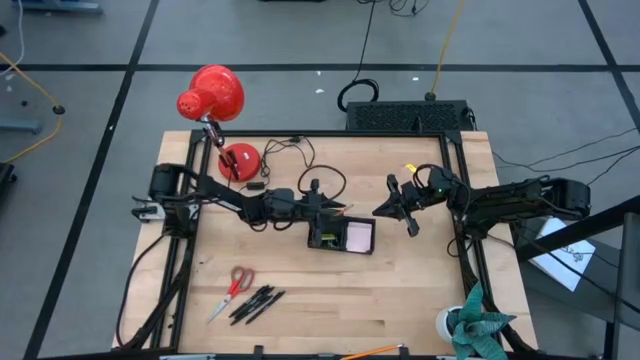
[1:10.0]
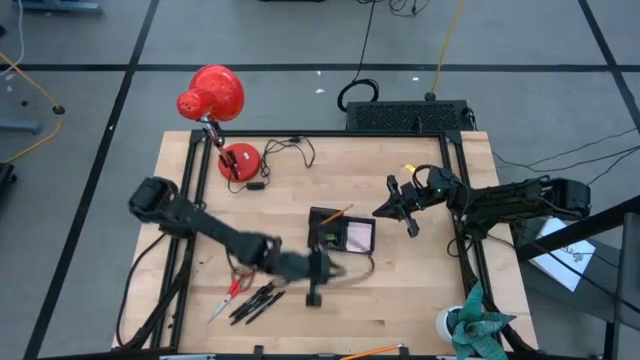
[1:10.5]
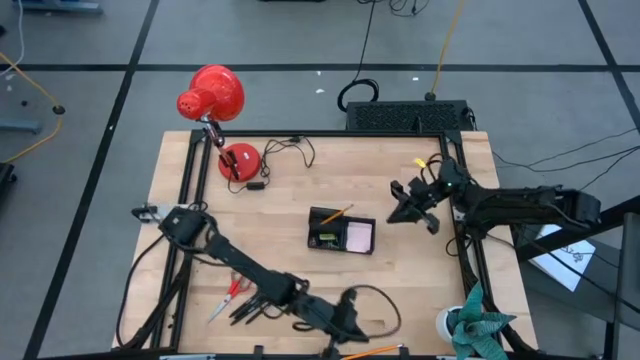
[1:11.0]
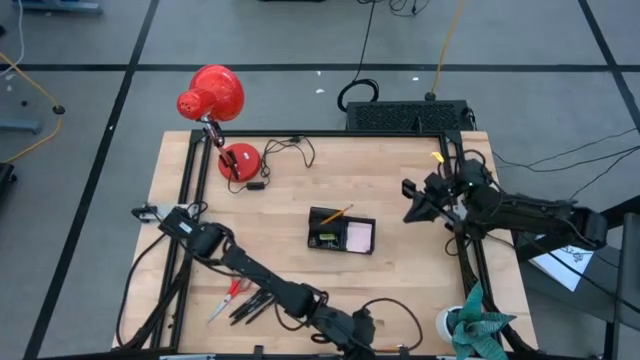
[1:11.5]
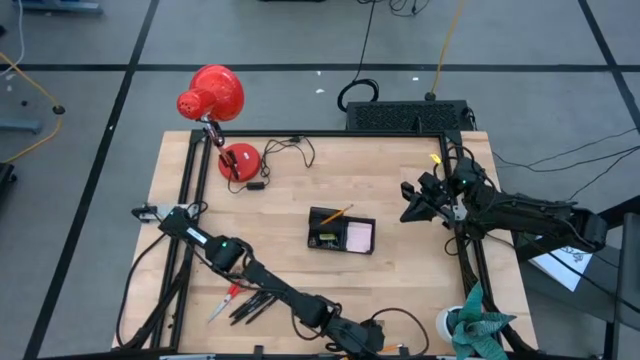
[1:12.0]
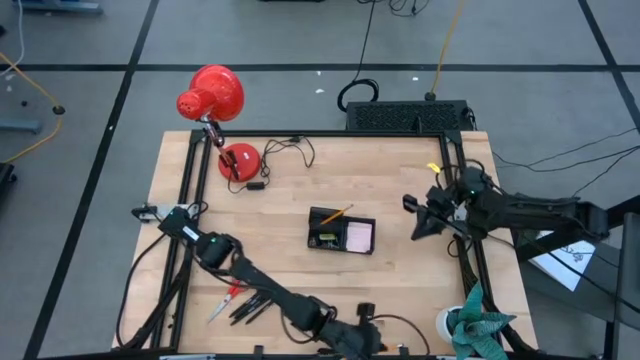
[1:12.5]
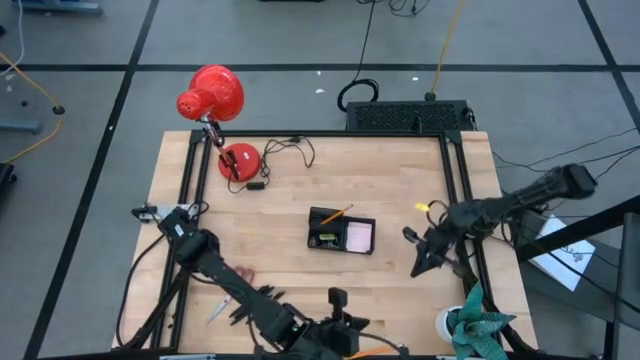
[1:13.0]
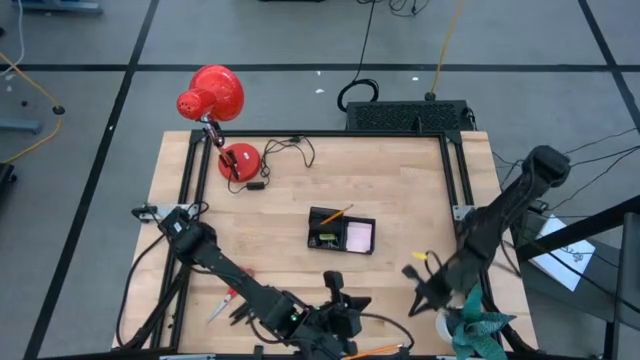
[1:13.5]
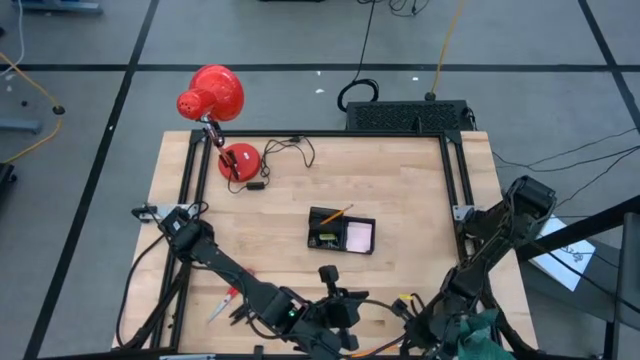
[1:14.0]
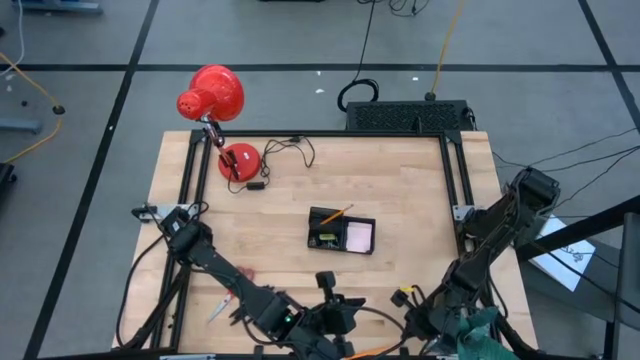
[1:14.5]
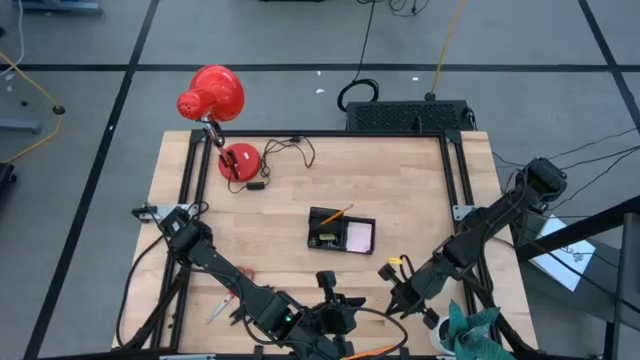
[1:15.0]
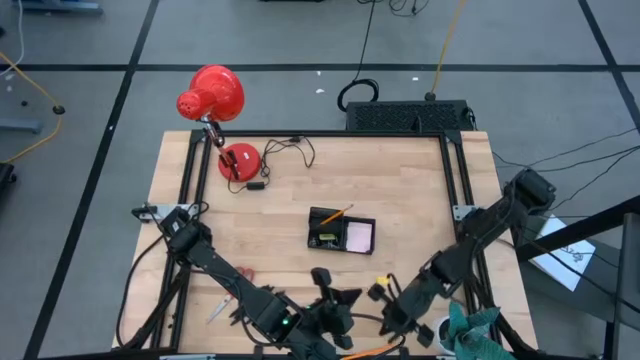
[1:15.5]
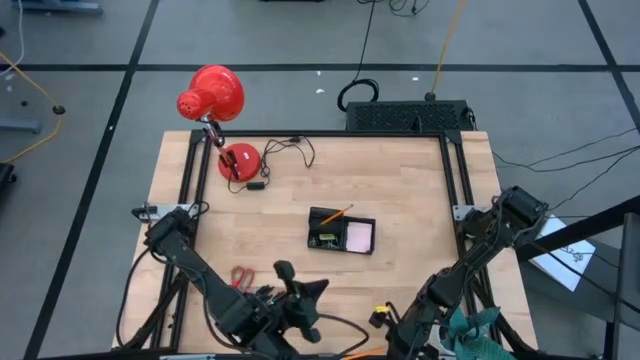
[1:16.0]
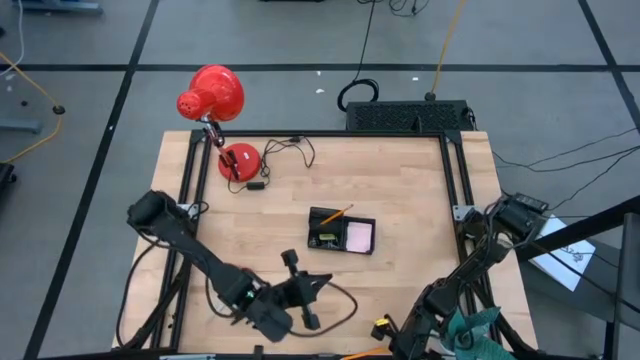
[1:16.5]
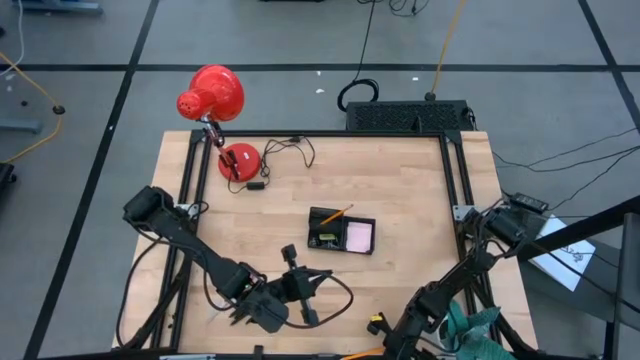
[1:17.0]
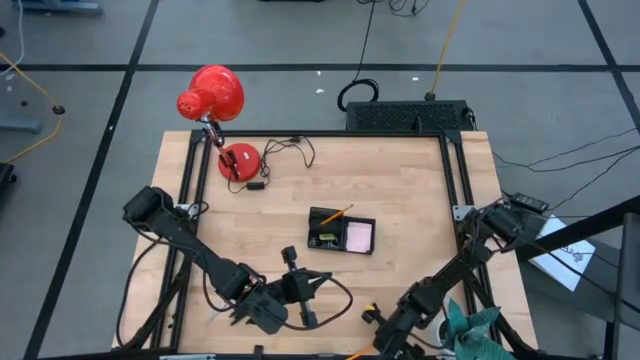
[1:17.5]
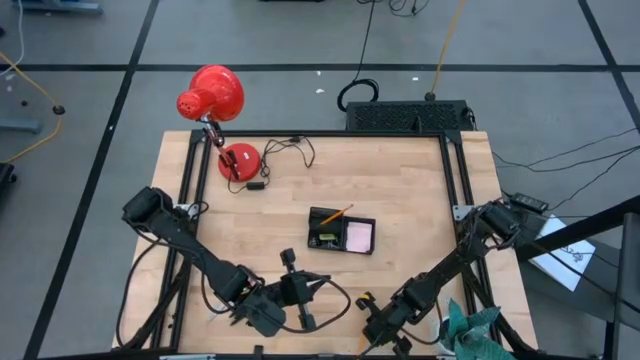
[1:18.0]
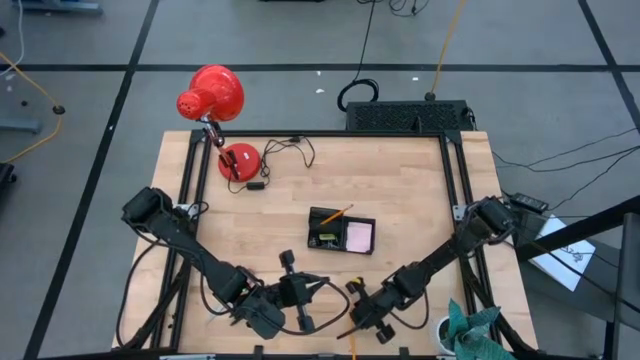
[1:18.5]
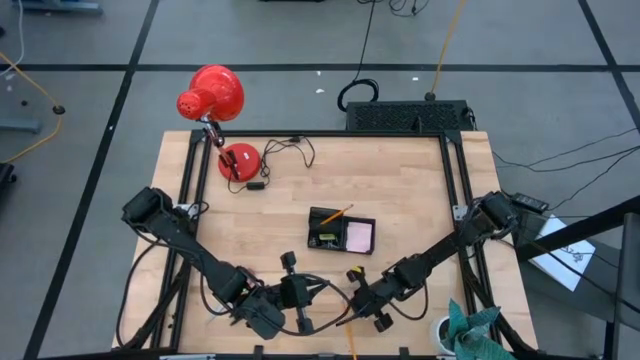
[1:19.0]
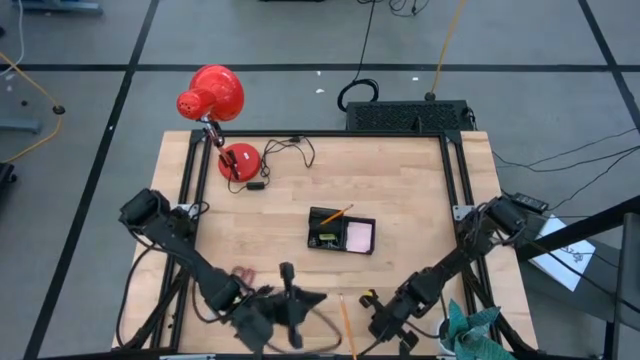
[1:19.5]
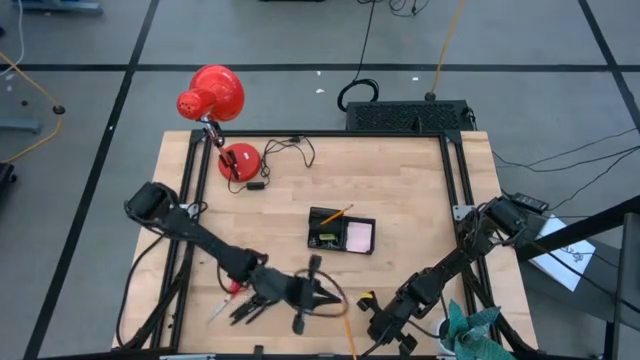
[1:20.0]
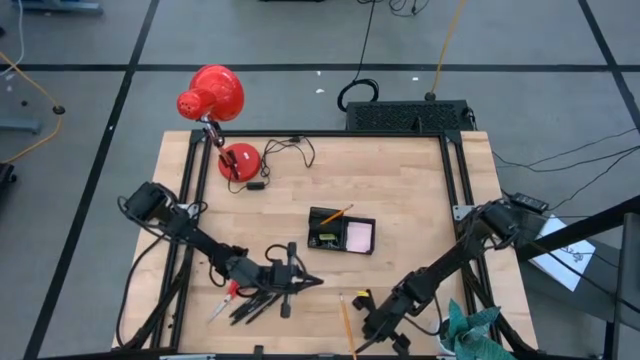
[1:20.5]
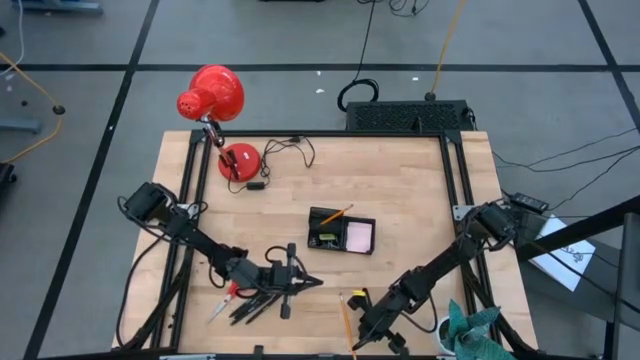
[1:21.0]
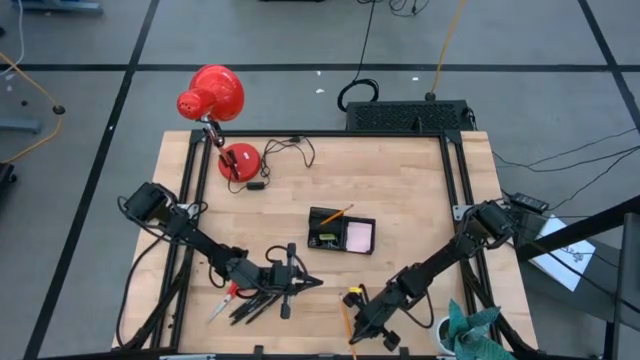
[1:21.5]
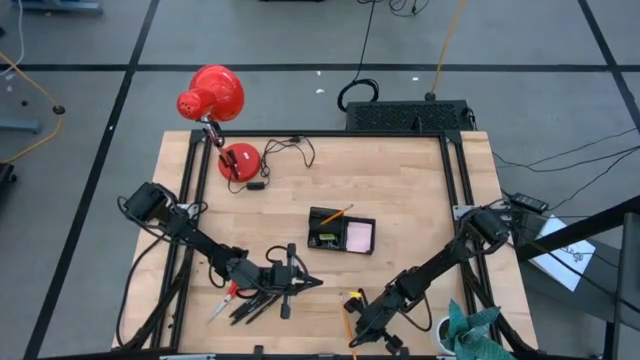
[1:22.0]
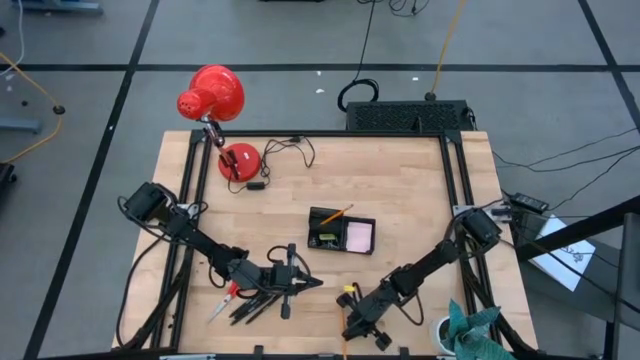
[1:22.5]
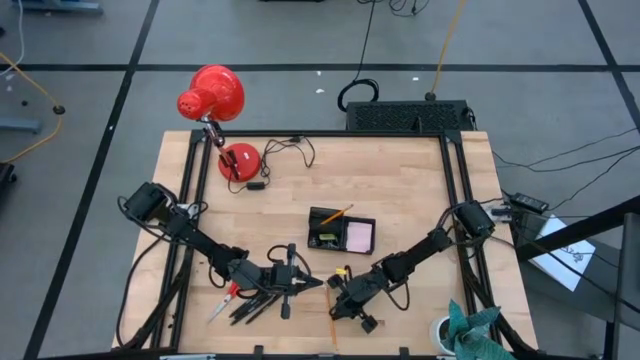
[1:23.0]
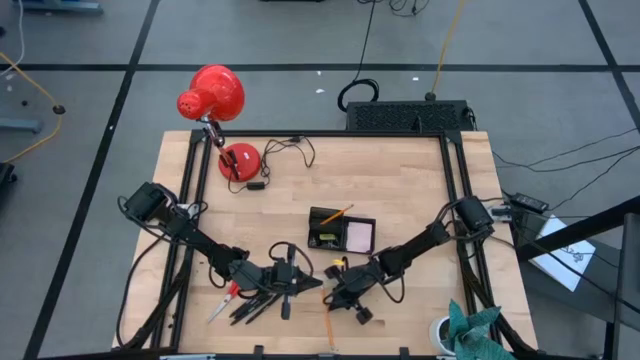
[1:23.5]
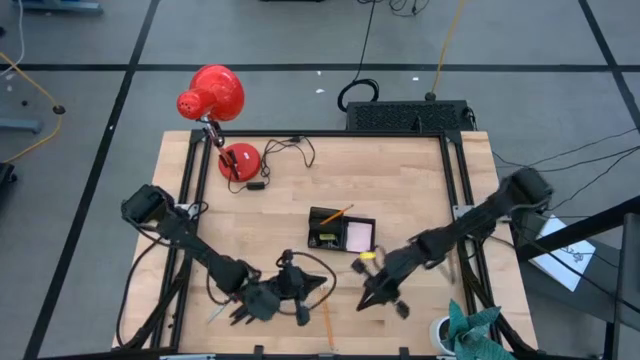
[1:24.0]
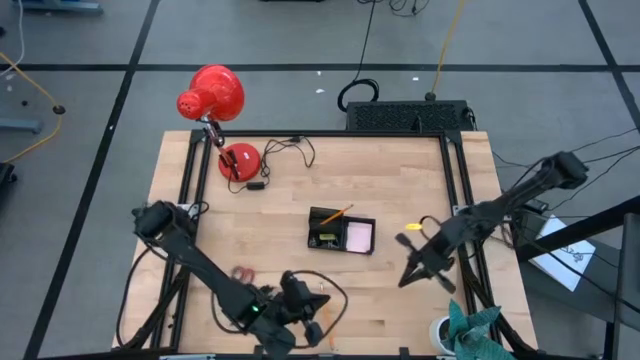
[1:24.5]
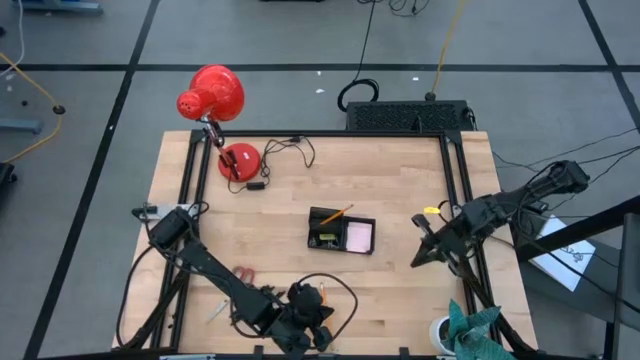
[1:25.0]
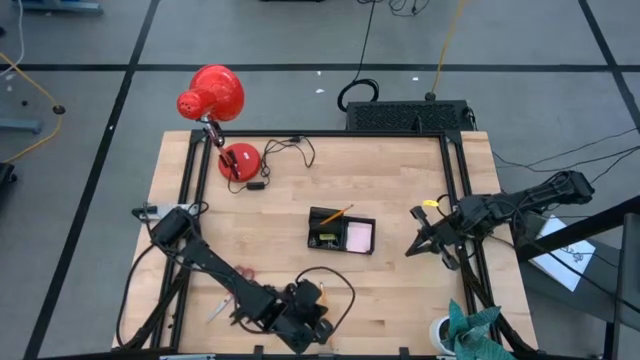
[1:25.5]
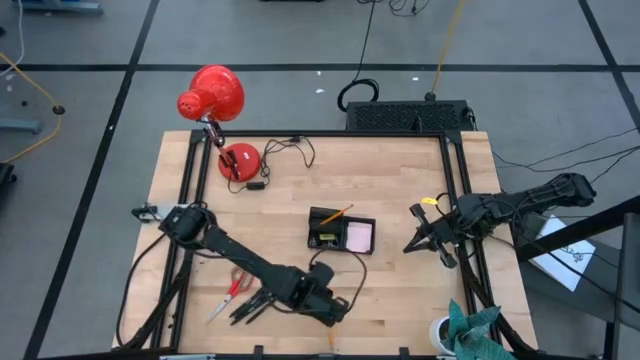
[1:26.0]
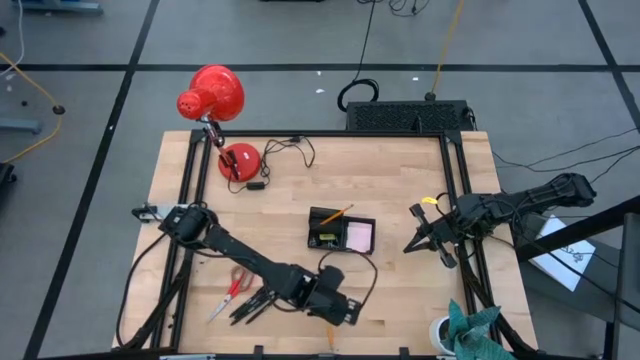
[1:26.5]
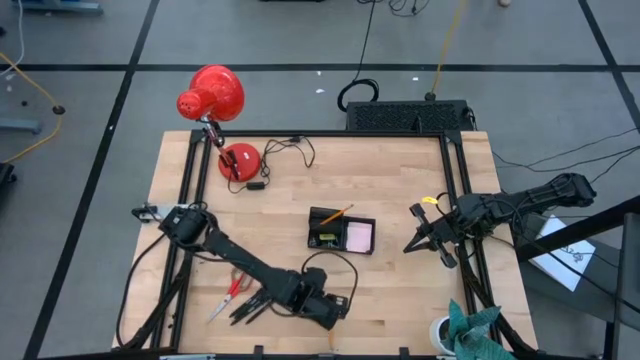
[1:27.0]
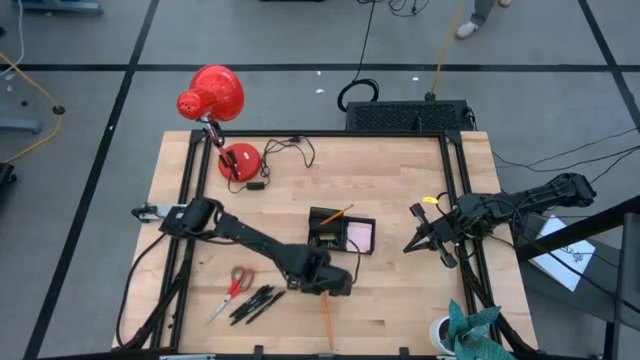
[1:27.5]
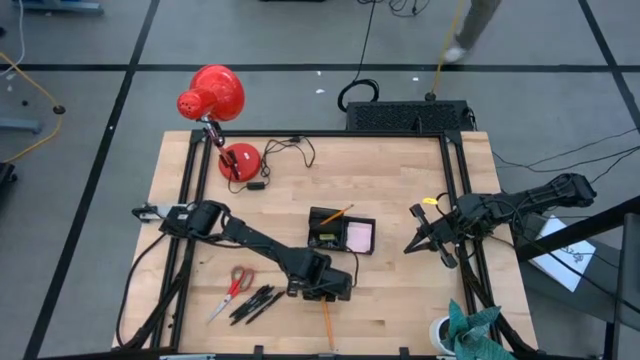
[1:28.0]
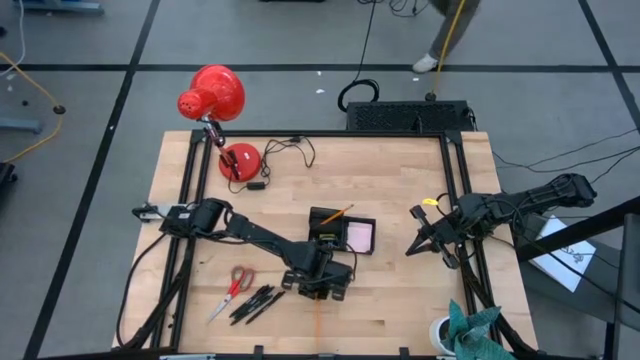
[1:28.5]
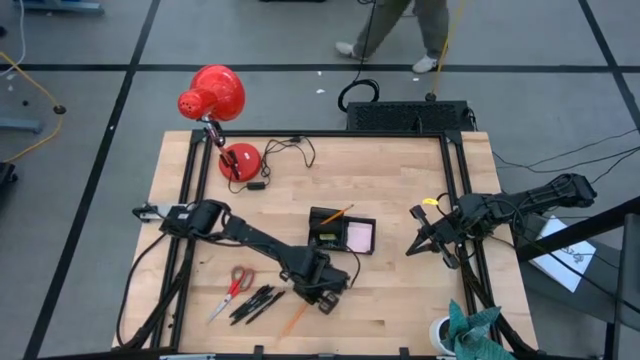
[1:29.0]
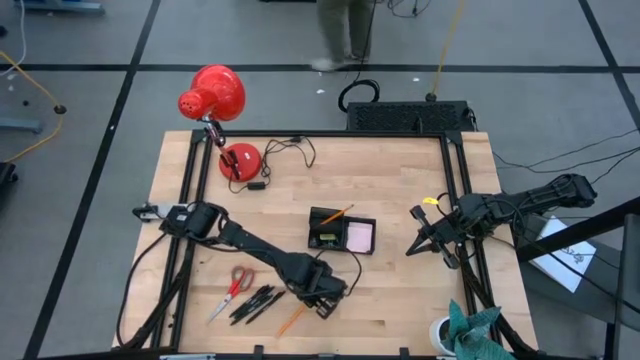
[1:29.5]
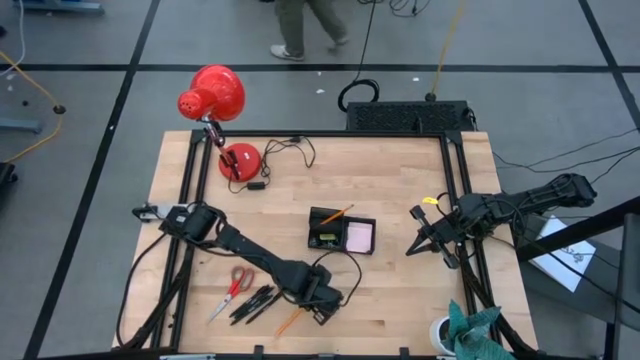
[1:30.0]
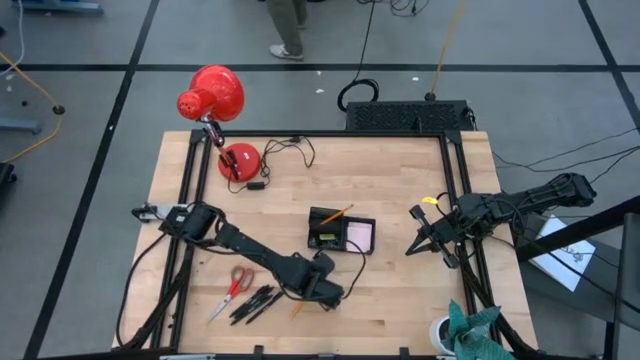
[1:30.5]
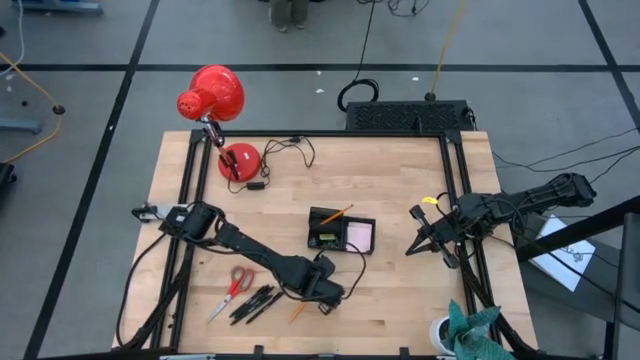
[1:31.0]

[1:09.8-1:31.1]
Task: Pick and place office supplies into organizer
Put the orange pencil into the desk organizer
